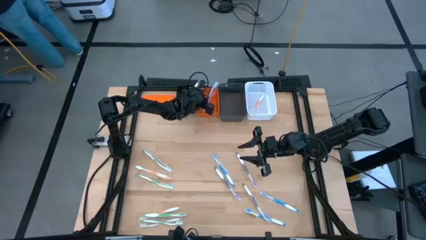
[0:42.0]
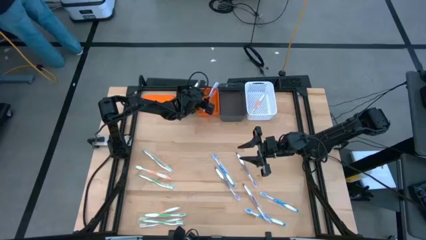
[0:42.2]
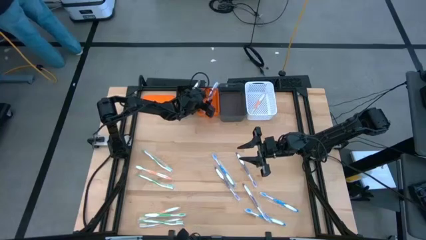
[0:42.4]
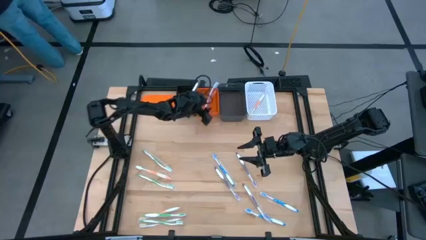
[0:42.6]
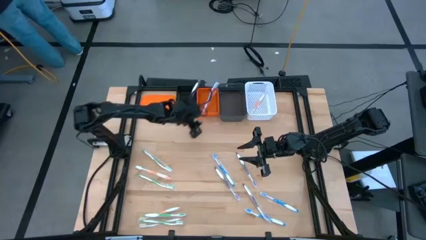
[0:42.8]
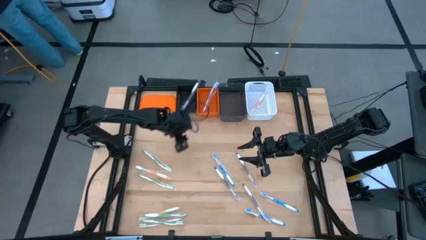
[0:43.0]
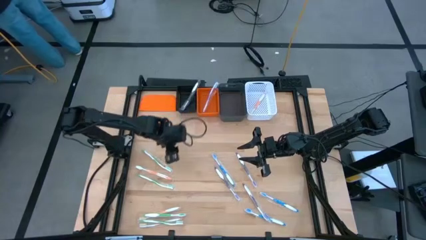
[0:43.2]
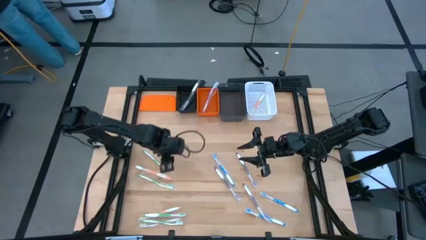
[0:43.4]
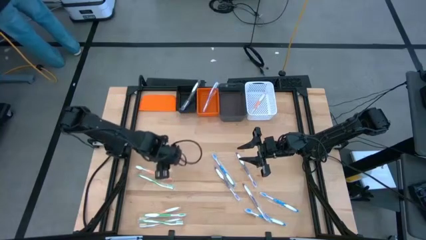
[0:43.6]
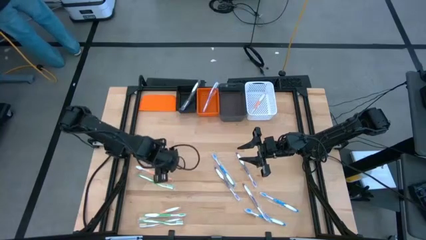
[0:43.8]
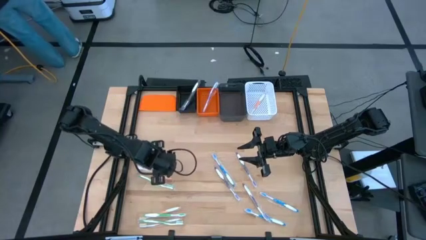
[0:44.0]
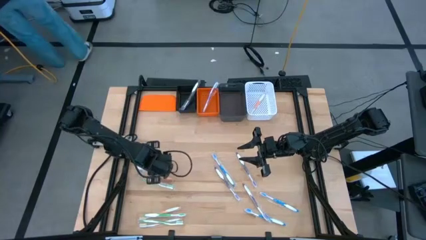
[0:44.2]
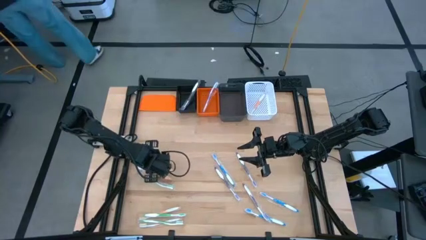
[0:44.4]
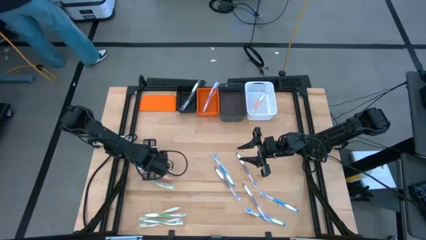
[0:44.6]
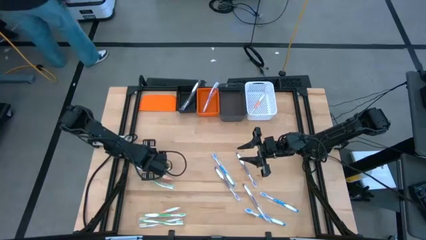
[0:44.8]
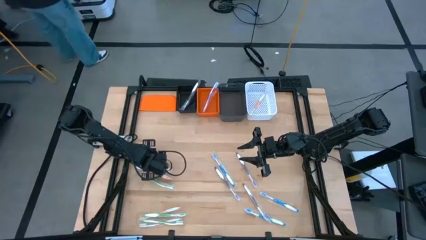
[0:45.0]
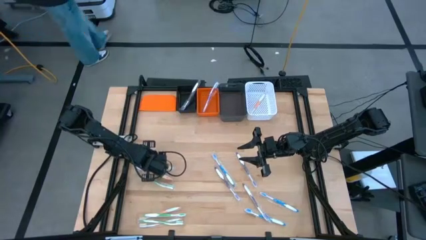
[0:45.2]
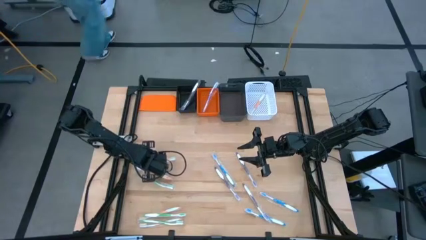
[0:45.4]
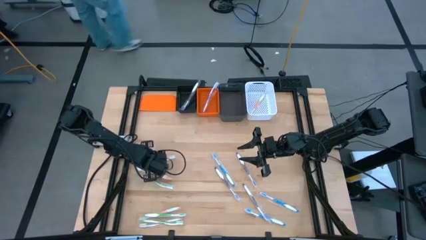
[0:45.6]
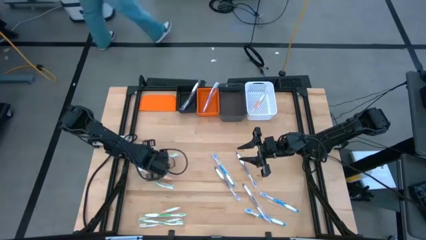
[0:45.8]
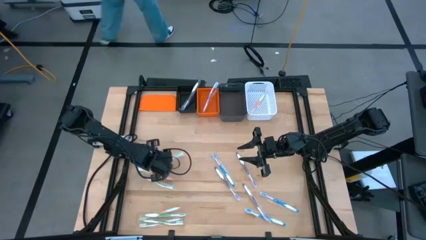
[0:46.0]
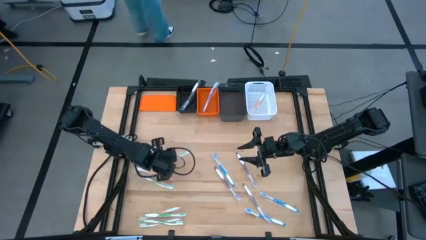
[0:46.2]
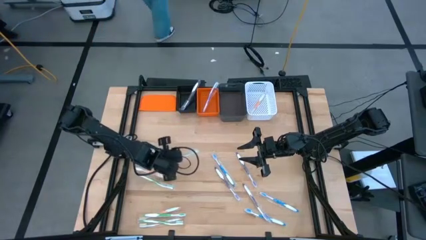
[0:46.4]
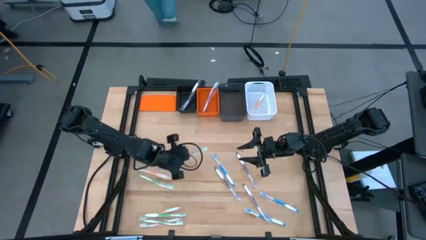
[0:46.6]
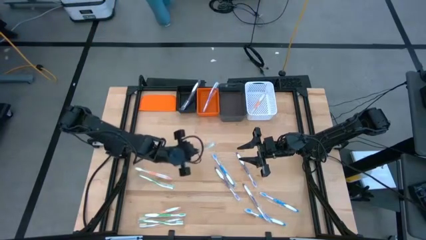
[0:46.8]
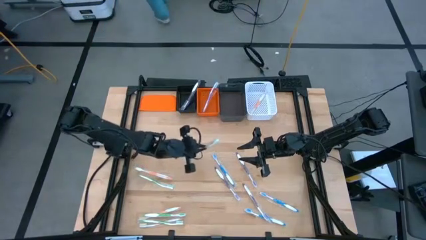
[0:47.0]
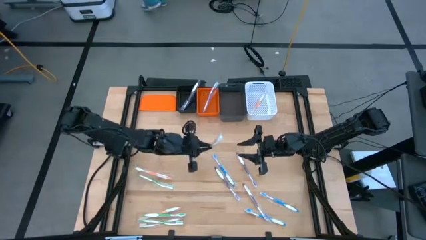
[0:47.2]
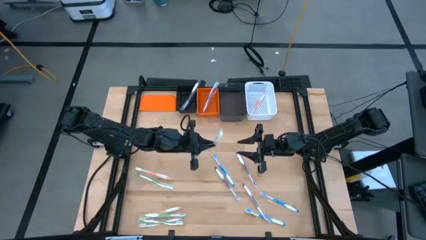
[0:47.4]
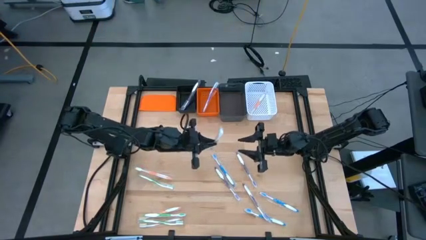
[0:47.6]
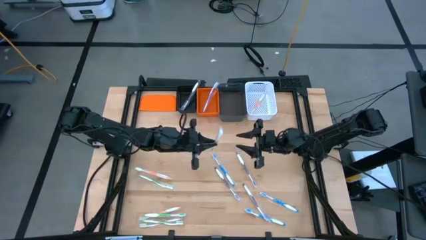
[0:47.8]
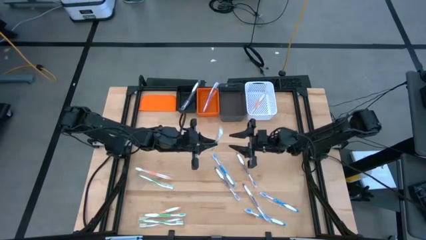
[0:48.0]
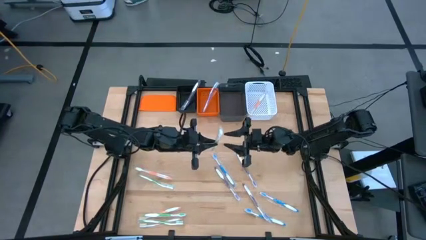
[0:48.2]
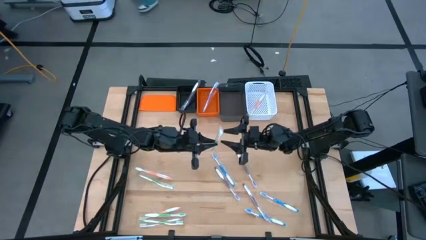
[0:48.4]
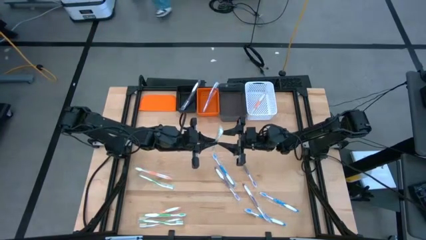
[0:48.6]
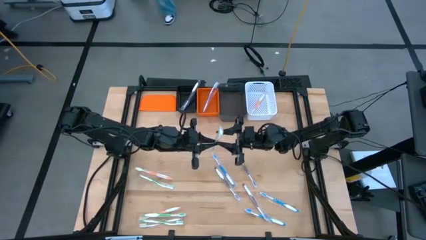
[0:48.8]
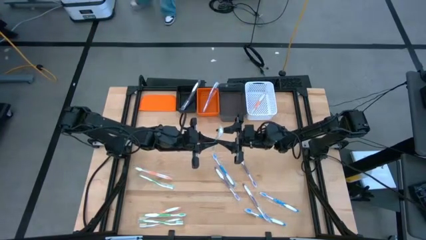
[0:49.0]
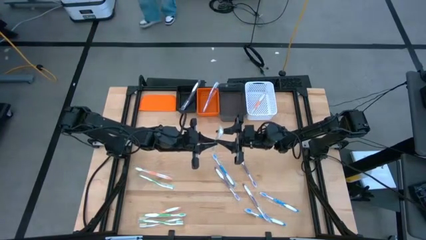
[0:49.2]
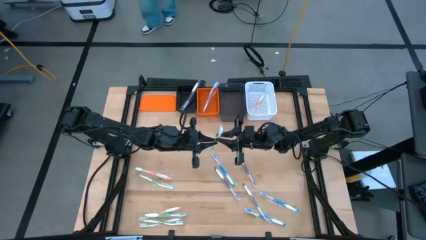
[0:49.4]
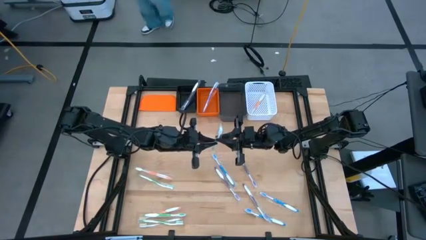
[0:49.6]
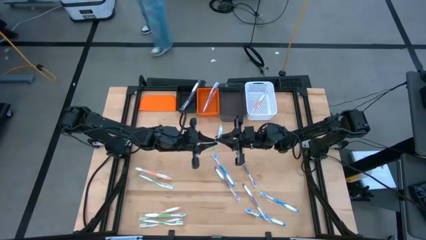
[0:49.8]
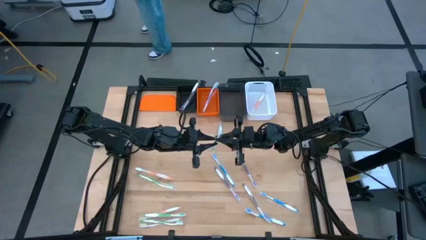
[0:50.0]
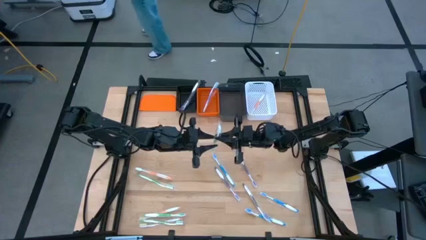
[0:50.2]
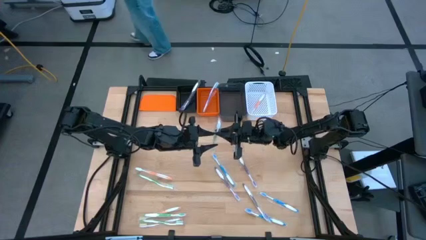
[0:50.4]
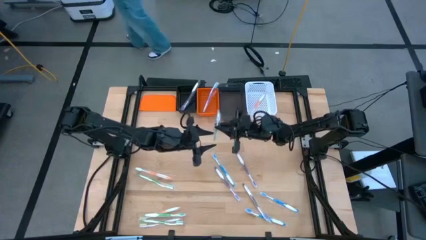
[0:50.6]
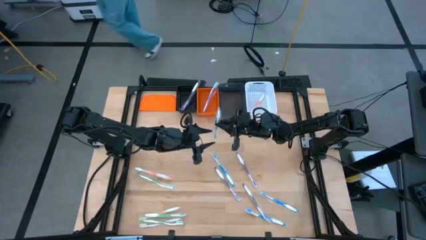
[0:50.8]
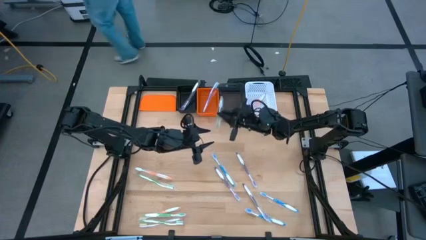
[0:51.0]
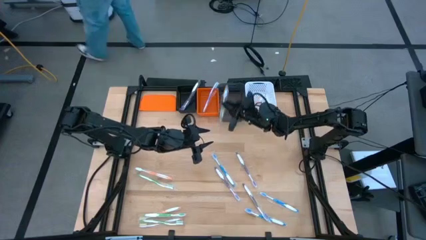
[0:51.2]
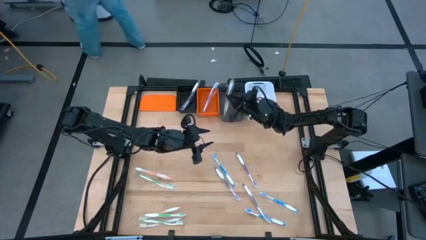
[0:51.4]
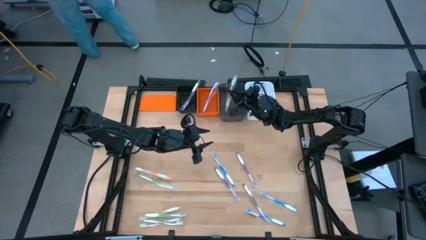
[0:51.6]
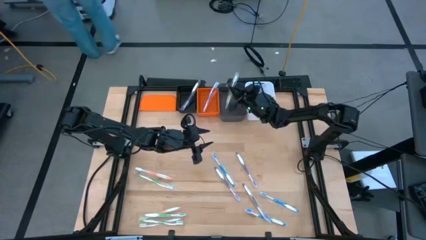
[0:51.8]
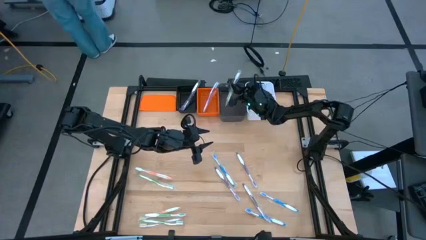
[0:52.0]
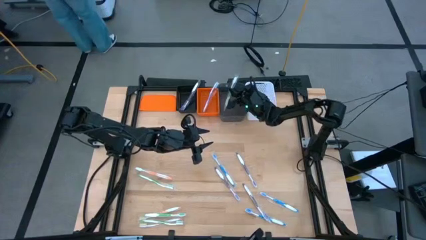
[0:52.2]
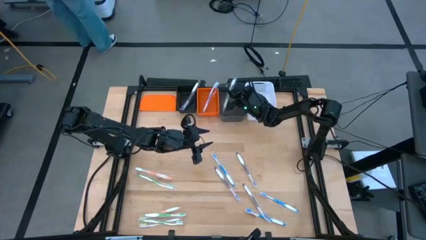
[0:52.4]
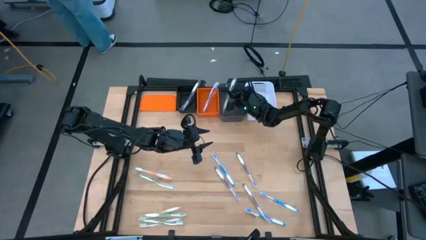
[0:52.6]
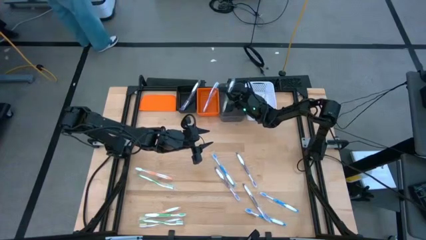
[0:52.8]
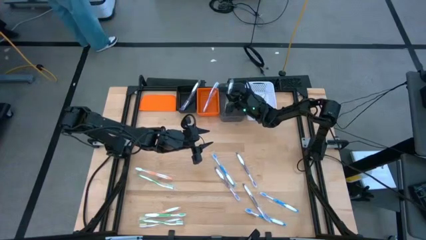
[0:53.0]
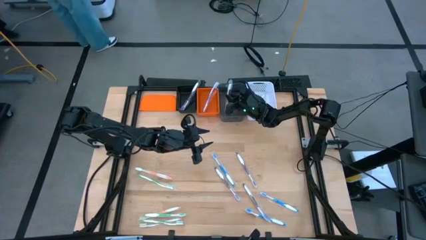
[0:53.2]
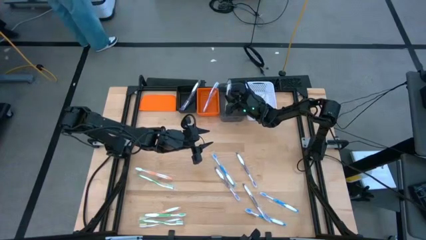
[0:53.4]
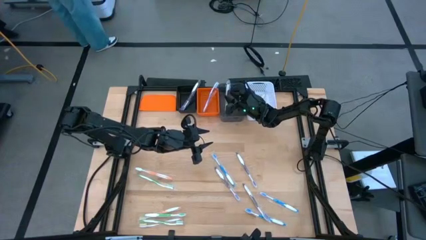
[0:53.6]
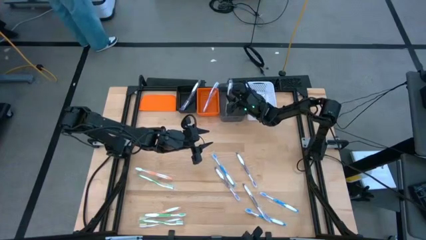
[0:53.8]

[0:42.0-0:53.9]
Task: Pick & Place Toothbrushes
Put the green toothbrush into the gray bin

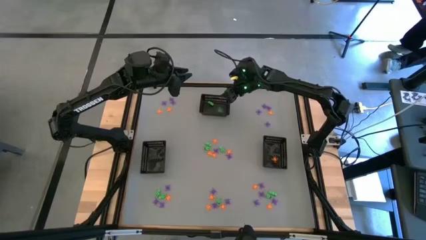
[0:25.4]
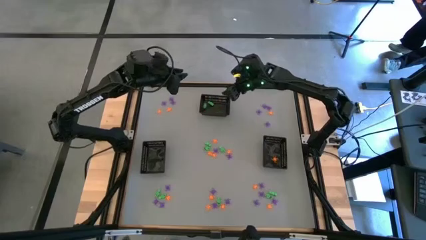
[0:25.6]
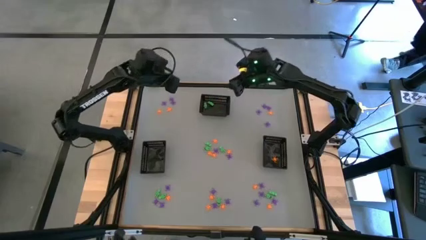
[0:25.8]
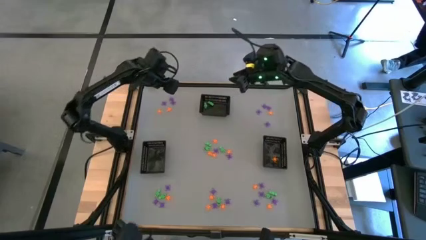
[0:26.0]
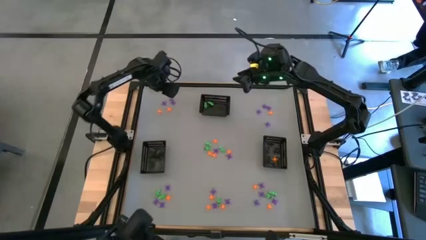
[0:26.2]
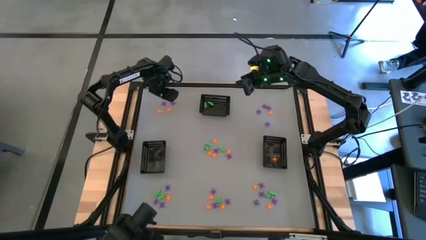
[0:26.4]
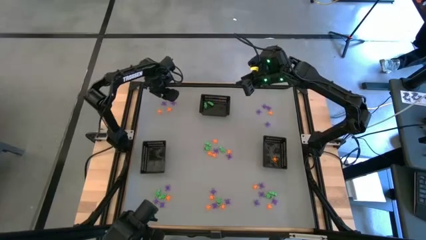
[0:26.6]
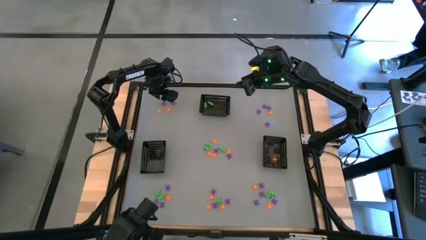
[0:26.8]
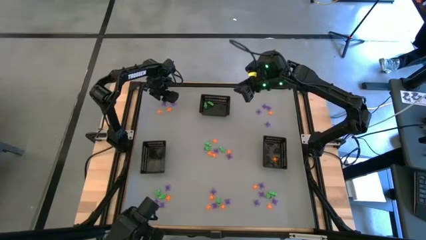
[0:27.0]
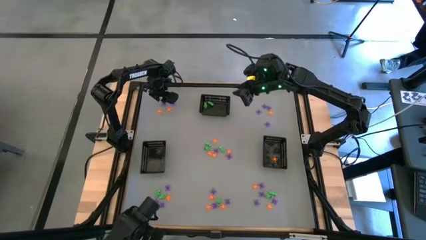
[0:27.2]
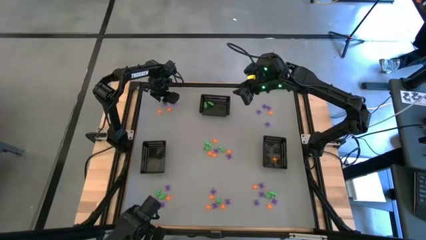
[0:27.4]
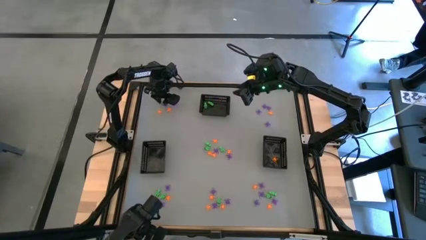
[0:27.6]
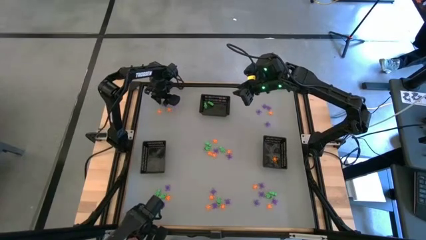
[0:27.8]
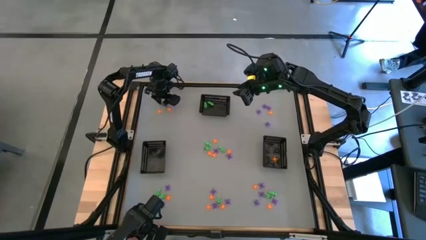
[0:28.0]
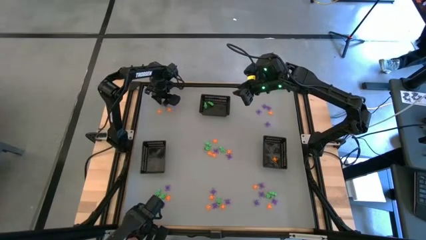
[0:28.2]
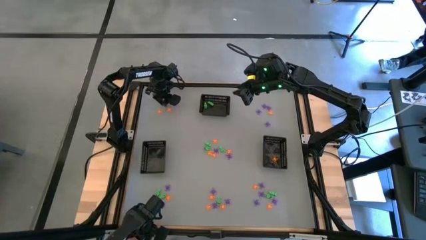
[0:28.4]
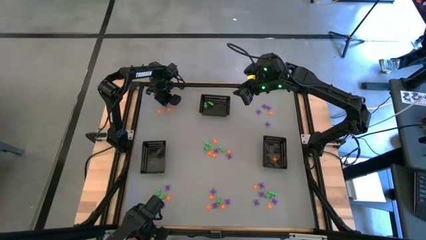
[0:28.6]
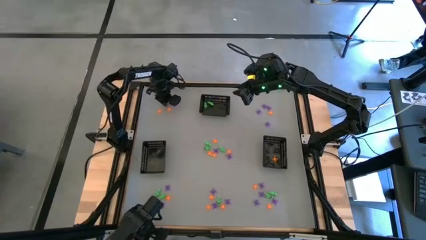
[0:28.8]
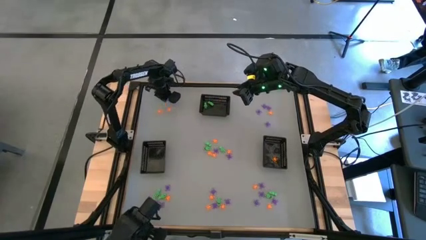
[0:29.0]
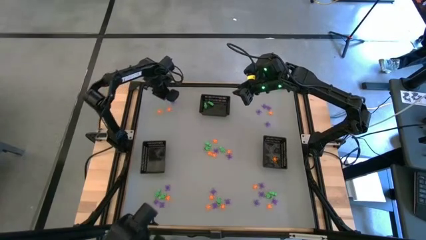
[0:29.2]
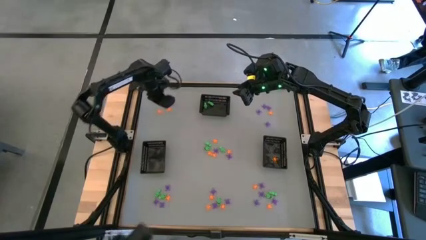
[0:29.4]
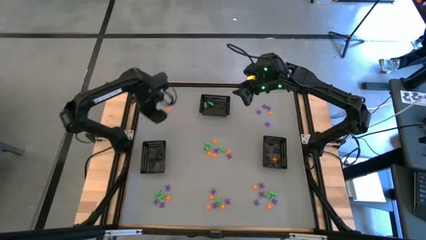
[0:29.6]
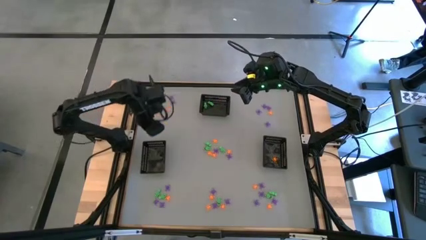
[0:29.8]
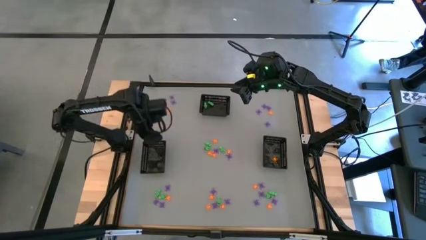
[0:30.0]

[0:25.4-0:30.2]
Task: Sort Halloween decoration
Put the violet spider toy into the left bin

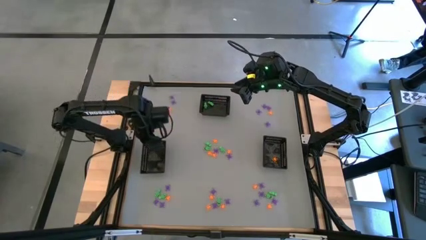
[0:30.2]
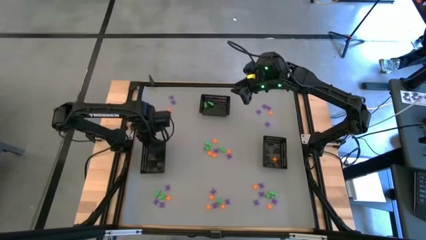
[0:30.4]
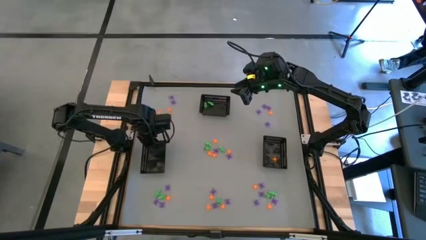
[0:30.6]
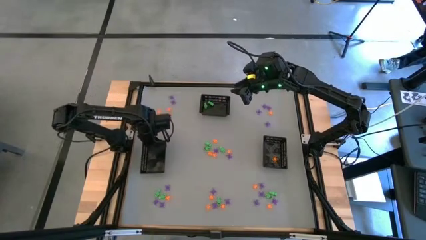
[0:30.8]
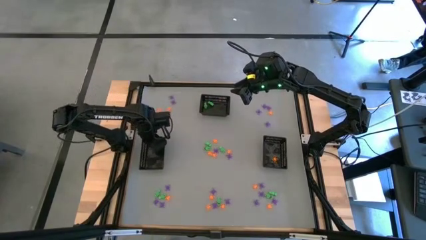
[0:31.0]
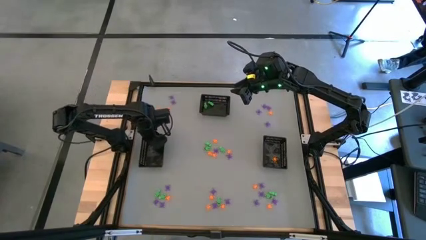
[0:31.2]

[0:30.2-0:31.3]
Adjust the left bin
